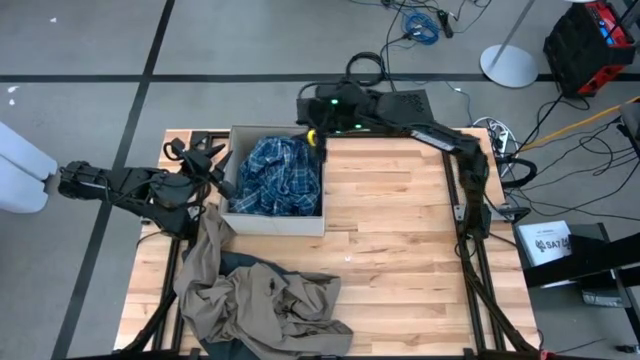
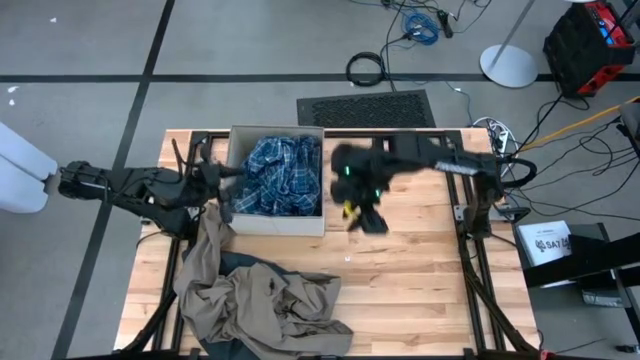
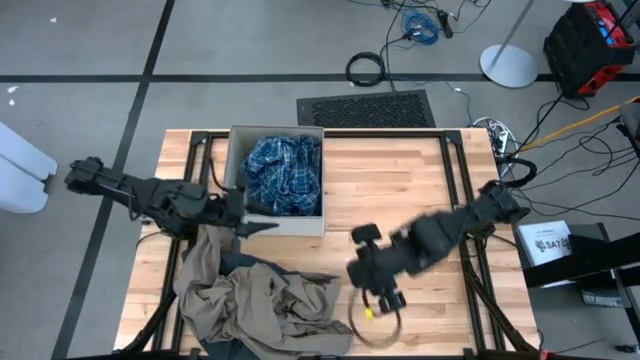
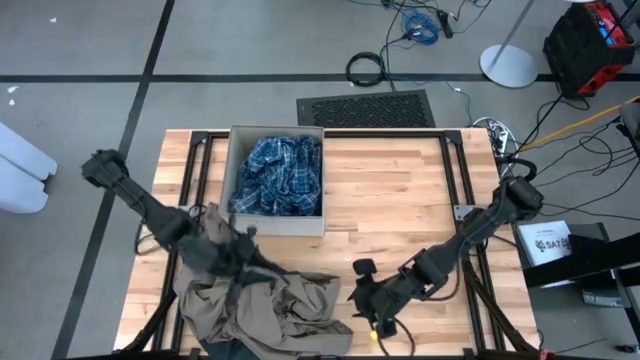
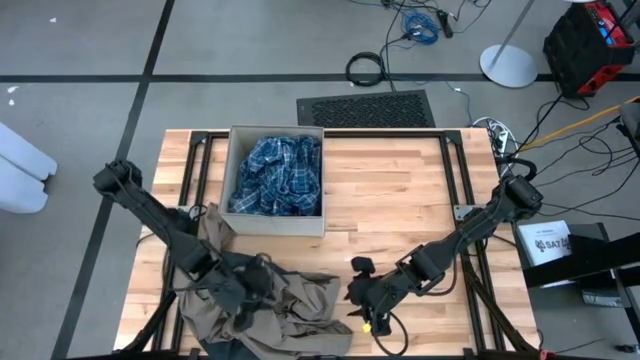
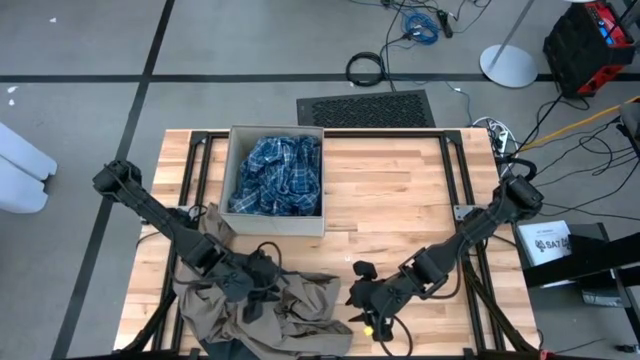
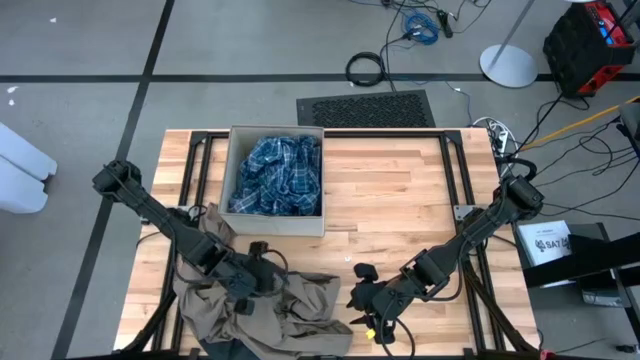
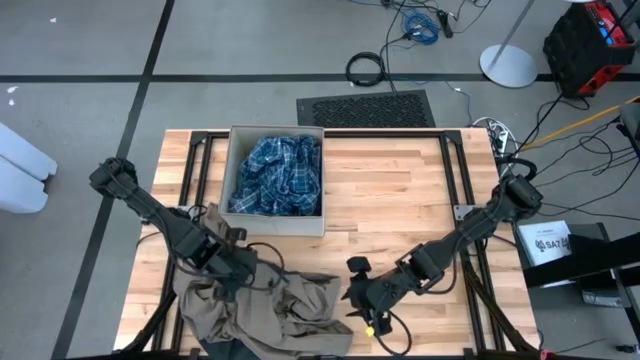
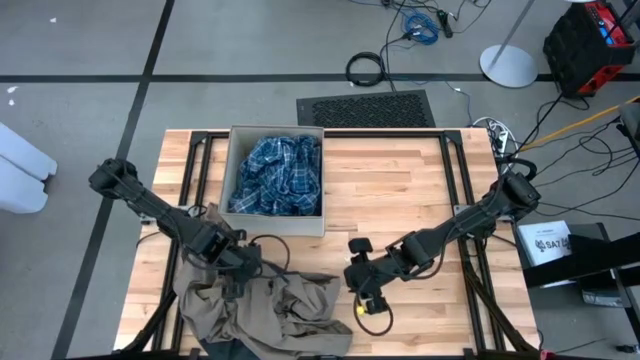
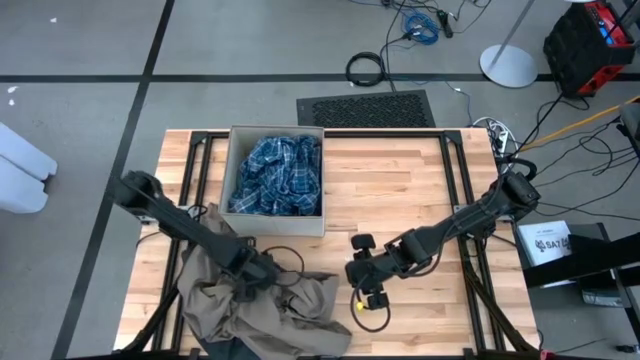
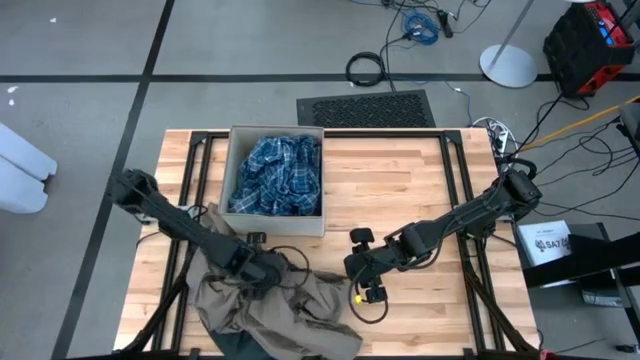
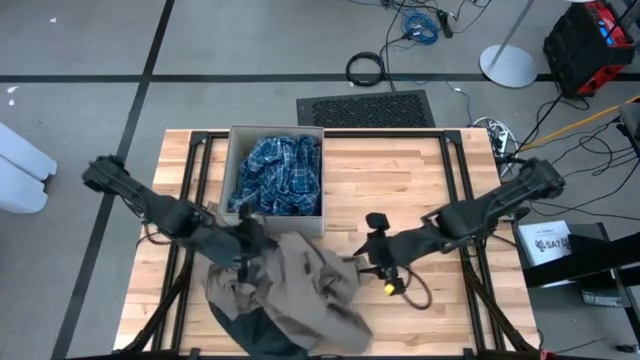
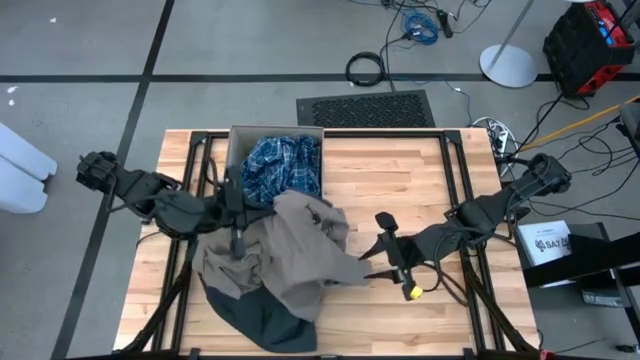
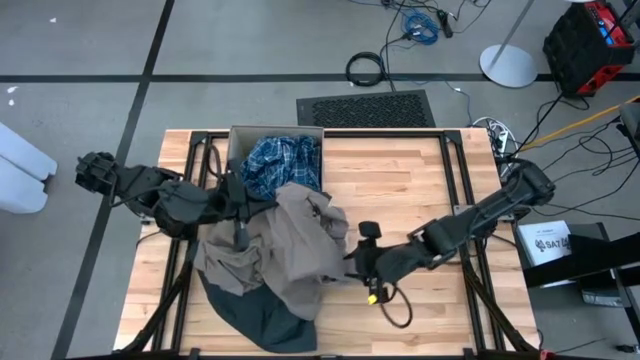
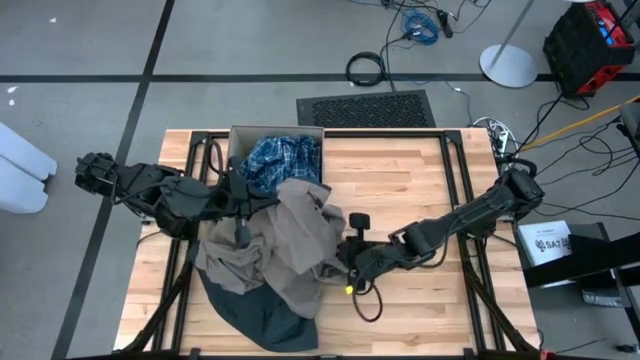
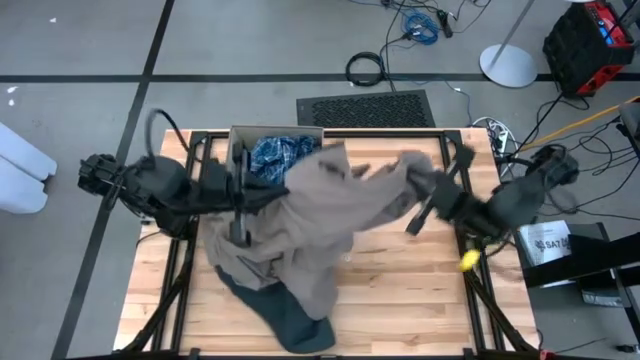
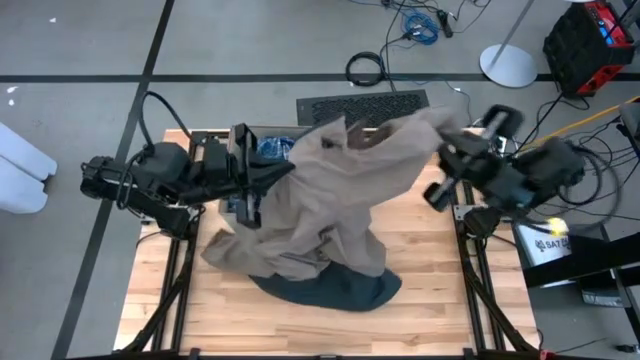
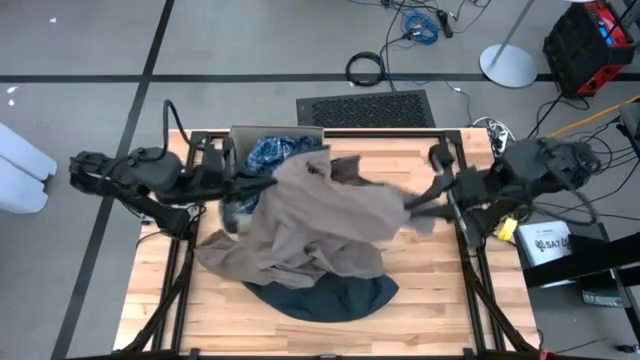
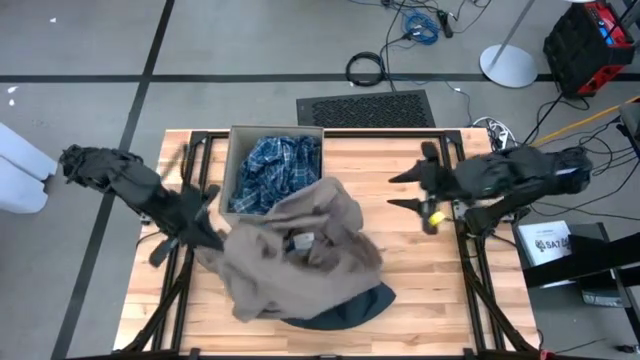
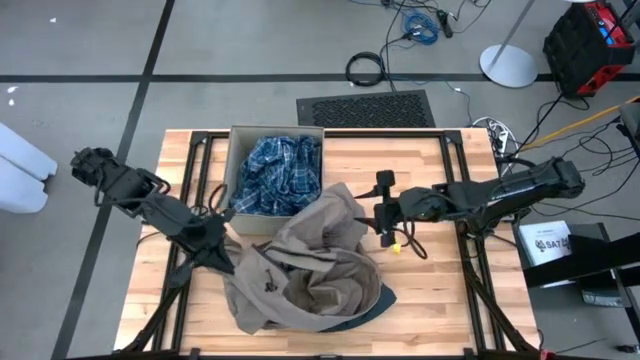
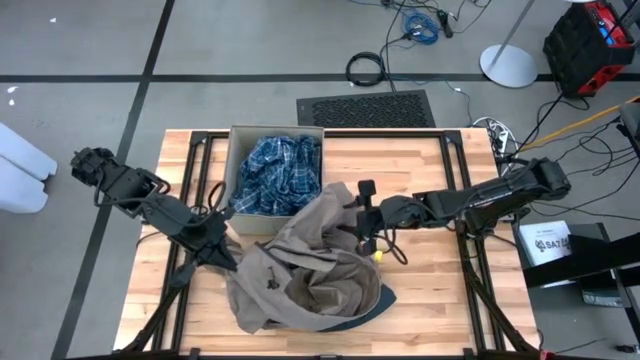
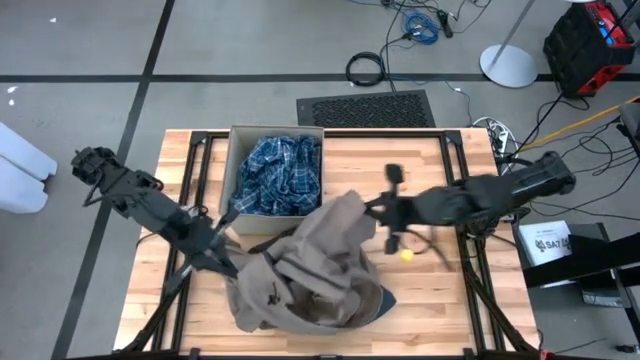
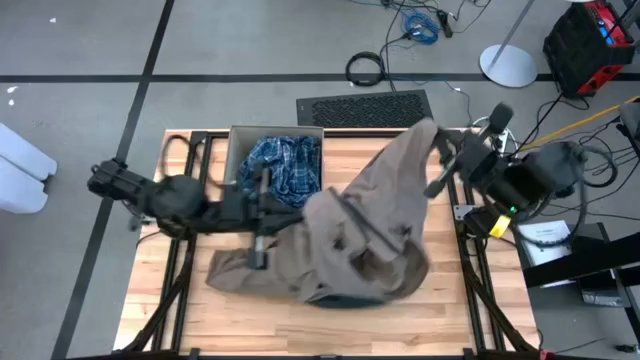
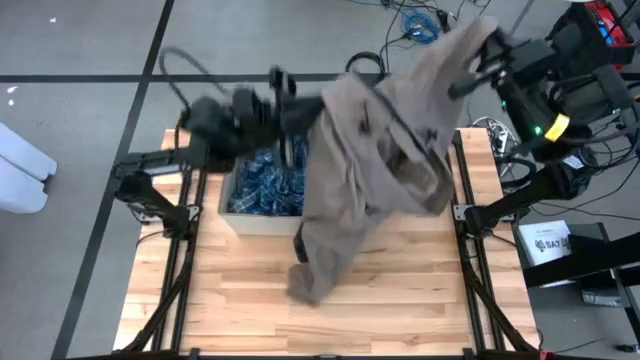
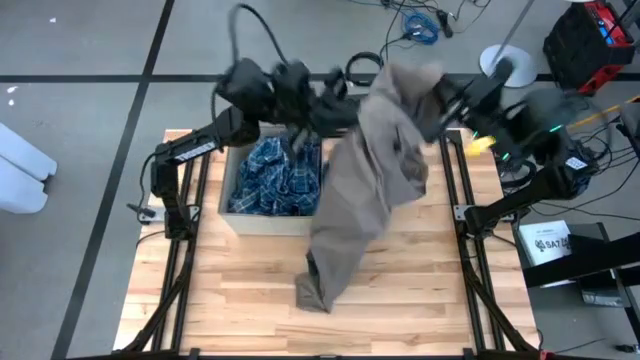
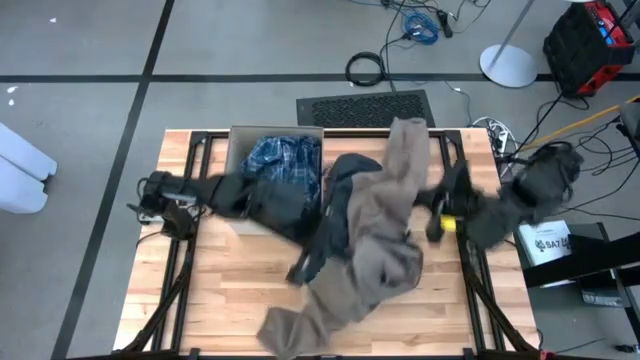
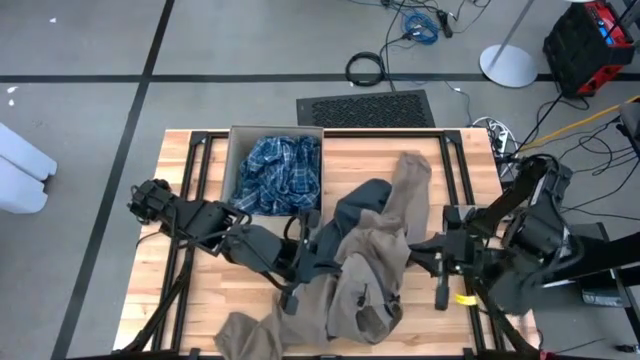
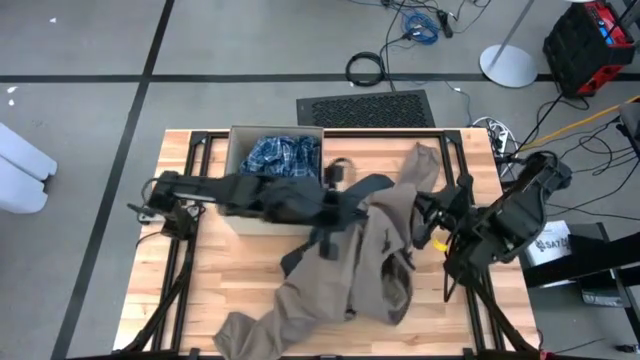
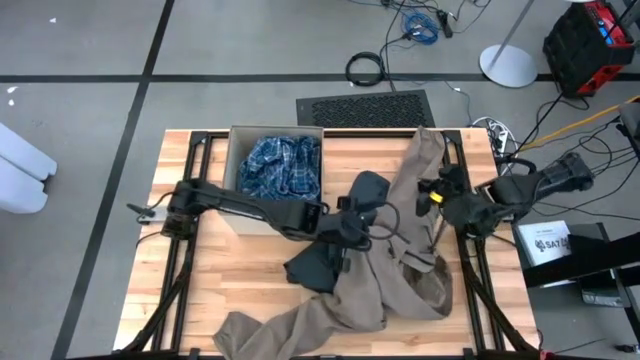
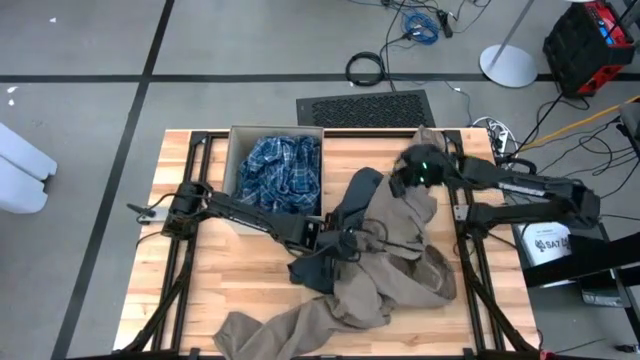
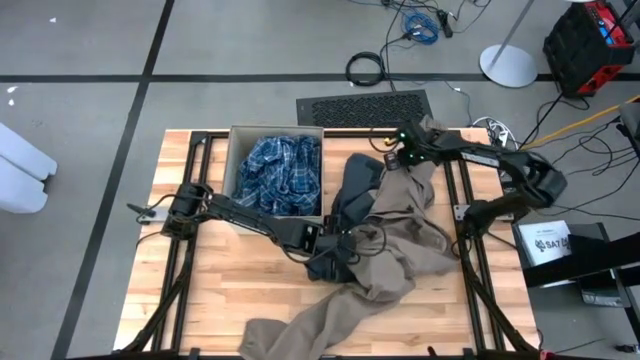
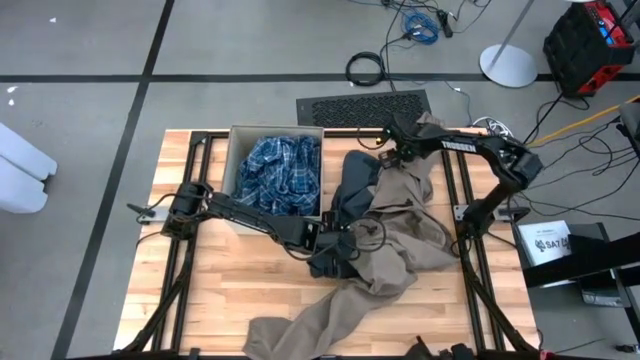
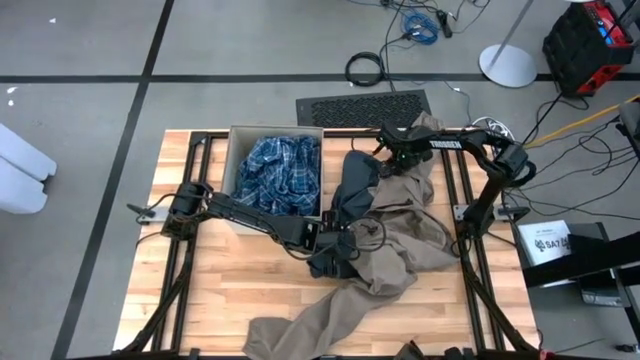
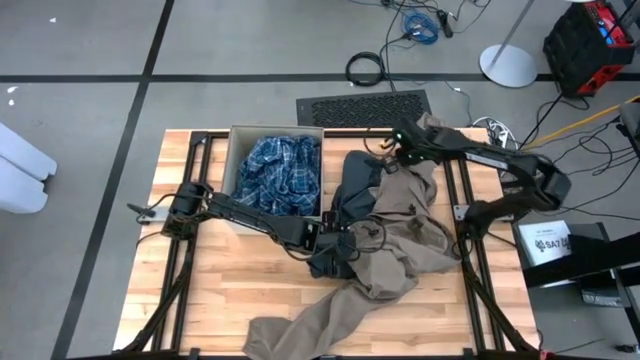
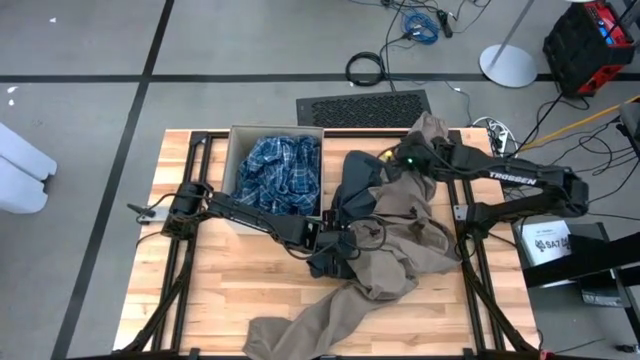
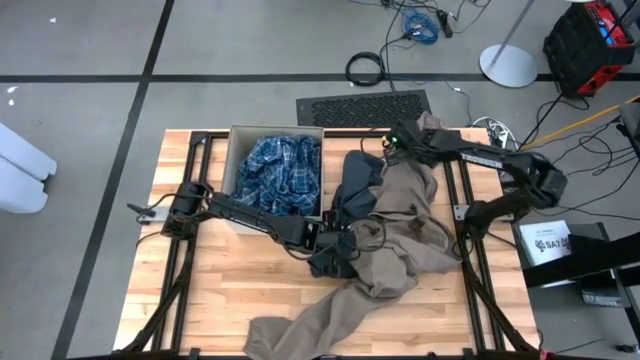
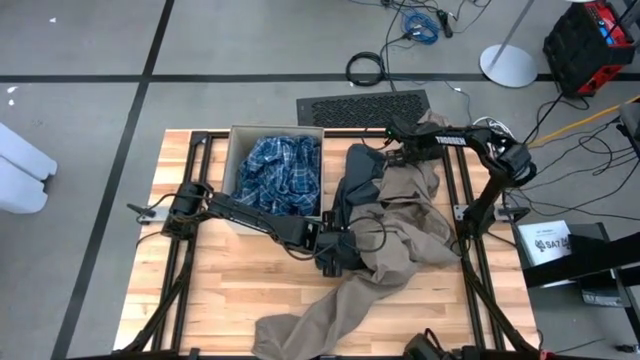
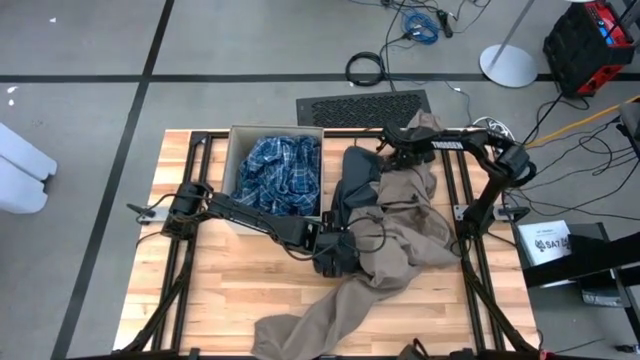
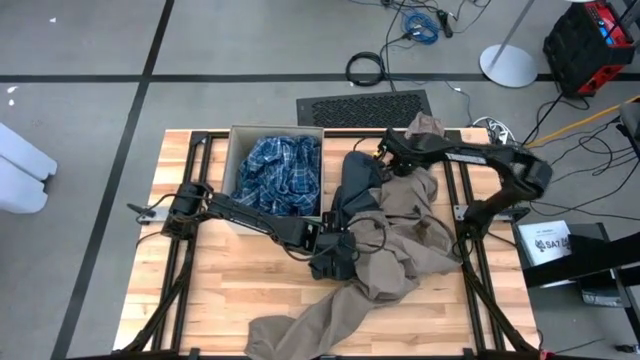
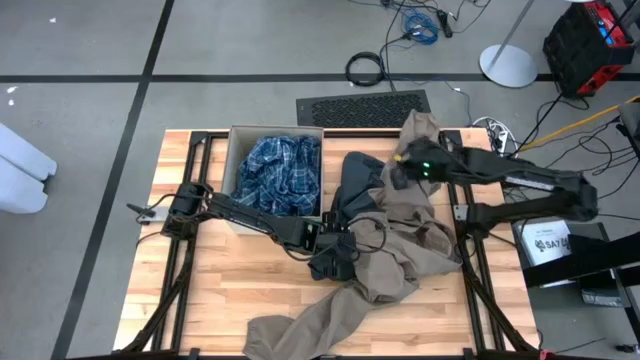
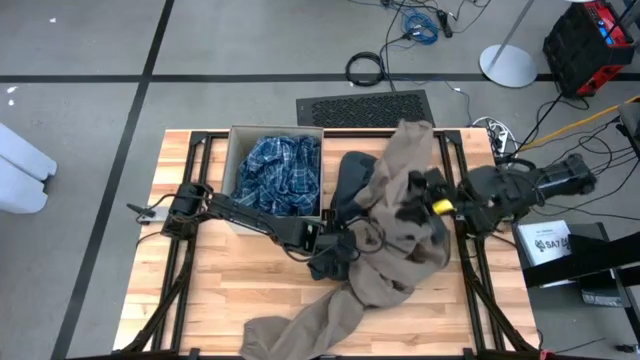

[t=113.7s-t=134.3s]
Task: Sort clothes
Put the brown jacket into the white laundry bin
